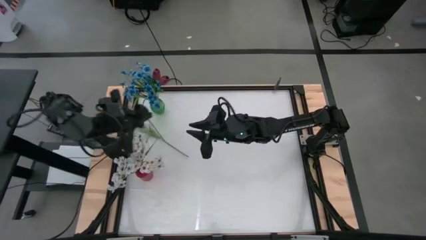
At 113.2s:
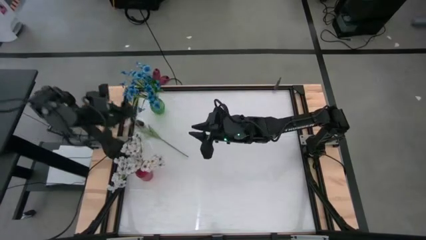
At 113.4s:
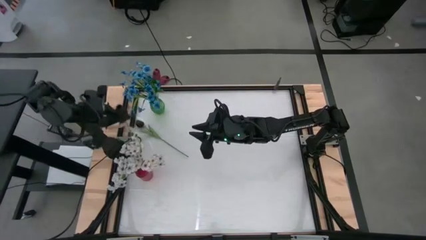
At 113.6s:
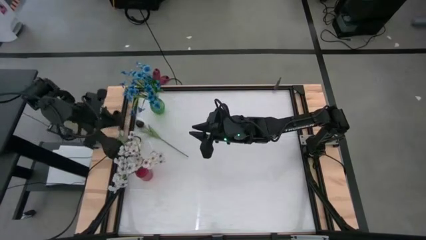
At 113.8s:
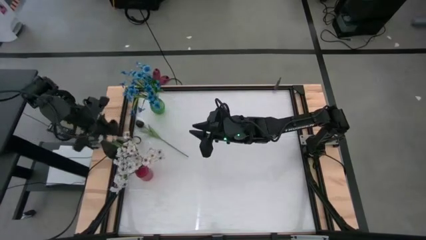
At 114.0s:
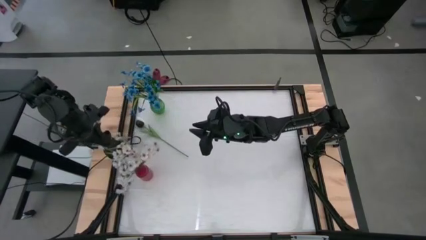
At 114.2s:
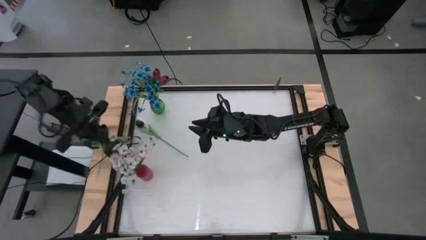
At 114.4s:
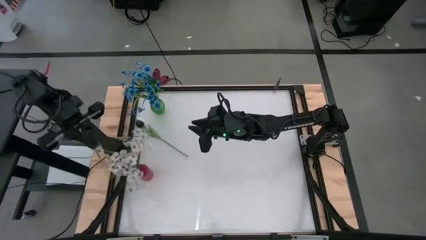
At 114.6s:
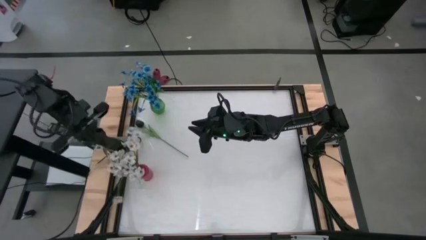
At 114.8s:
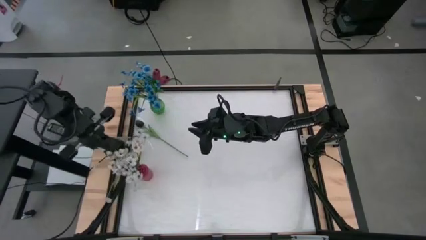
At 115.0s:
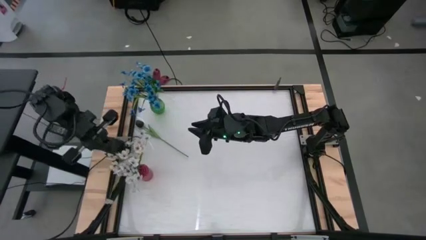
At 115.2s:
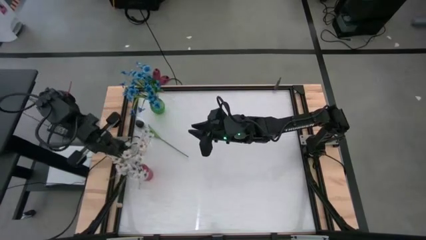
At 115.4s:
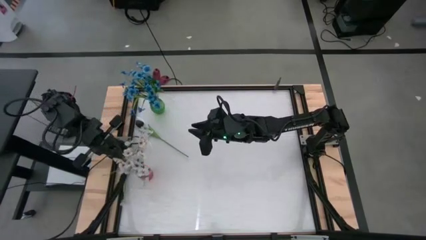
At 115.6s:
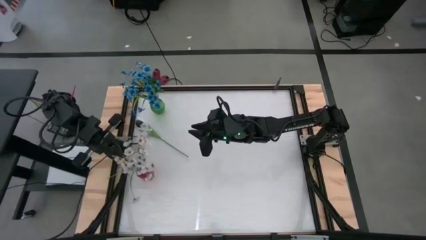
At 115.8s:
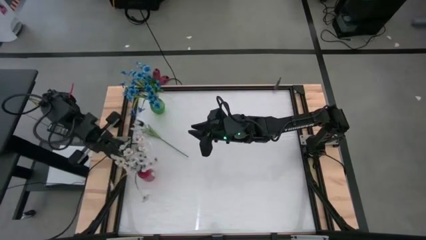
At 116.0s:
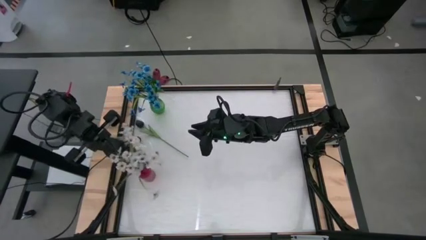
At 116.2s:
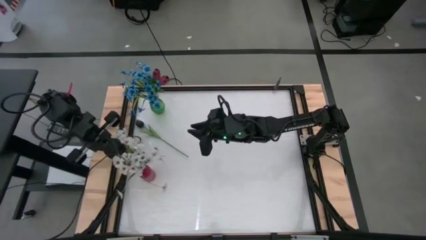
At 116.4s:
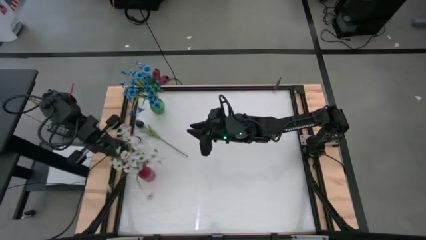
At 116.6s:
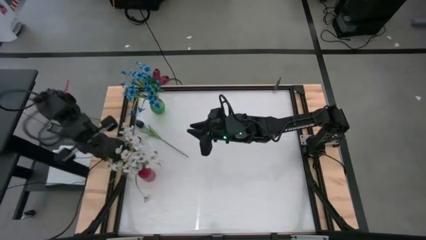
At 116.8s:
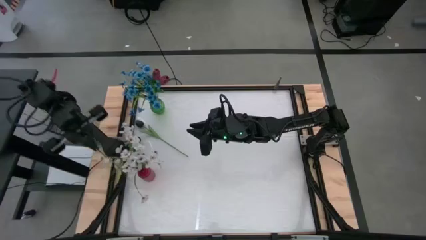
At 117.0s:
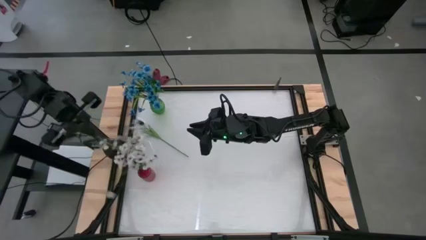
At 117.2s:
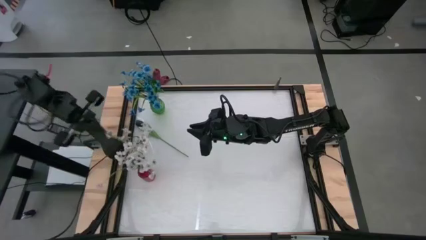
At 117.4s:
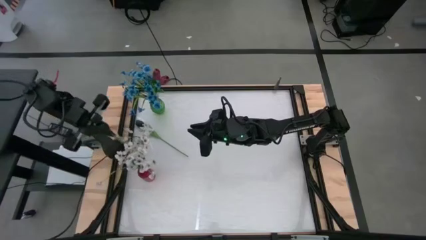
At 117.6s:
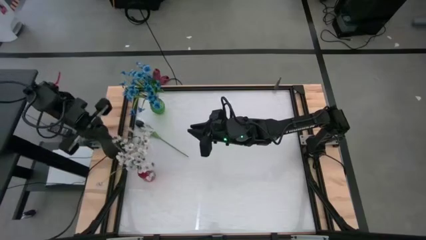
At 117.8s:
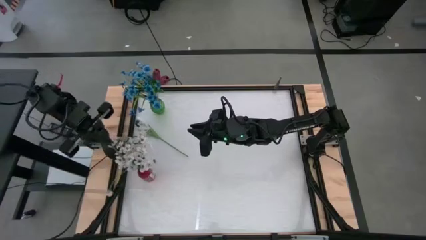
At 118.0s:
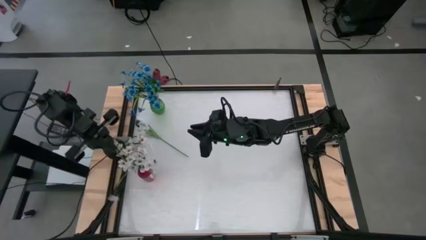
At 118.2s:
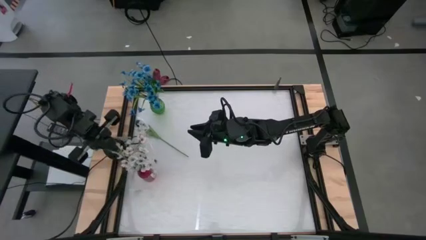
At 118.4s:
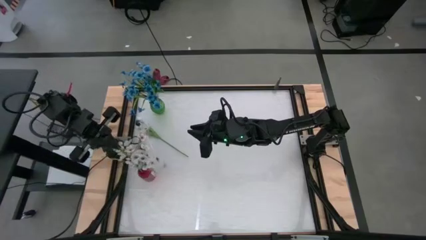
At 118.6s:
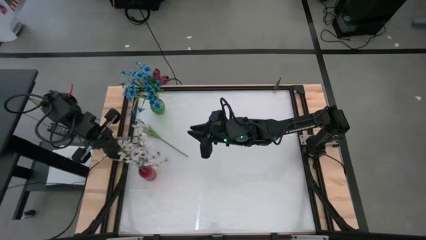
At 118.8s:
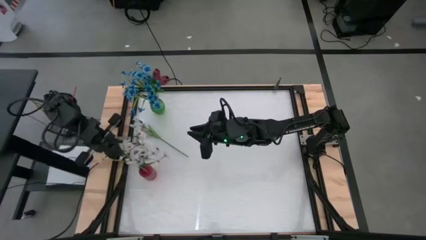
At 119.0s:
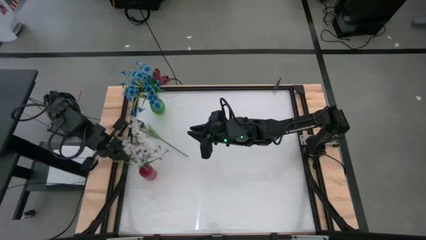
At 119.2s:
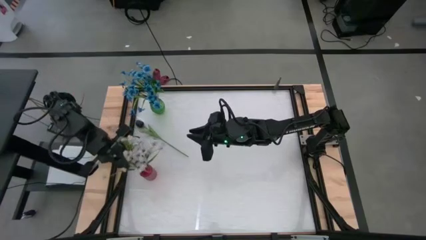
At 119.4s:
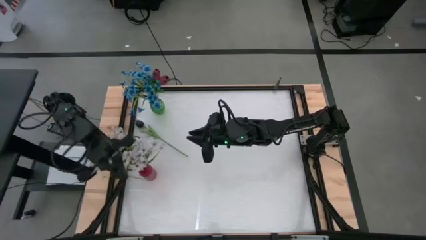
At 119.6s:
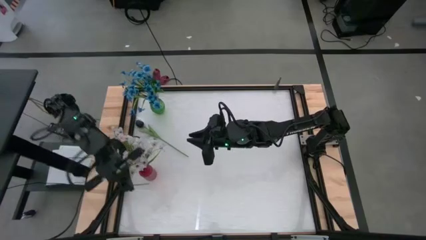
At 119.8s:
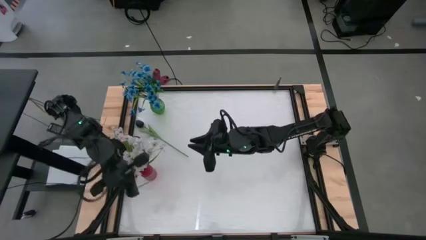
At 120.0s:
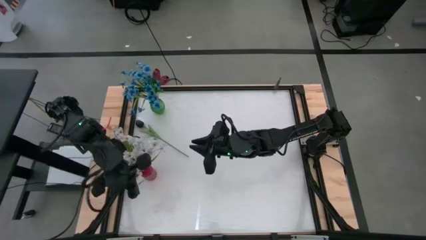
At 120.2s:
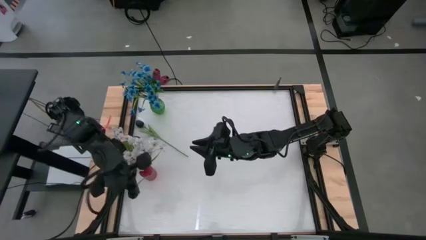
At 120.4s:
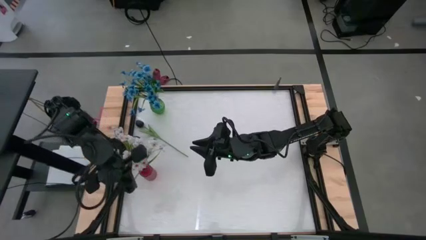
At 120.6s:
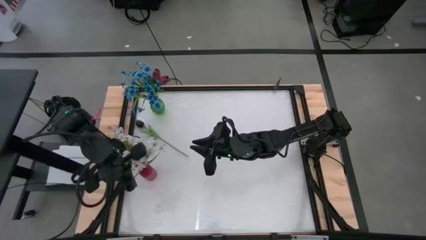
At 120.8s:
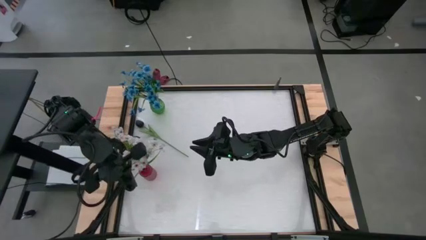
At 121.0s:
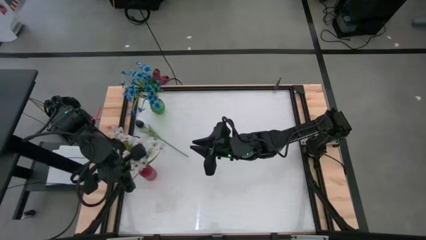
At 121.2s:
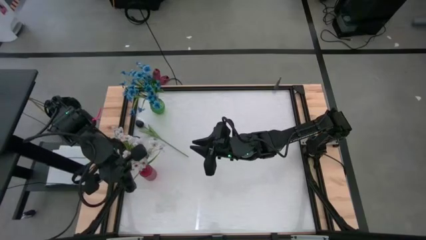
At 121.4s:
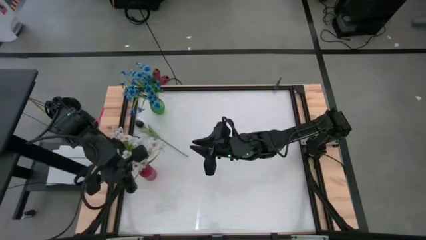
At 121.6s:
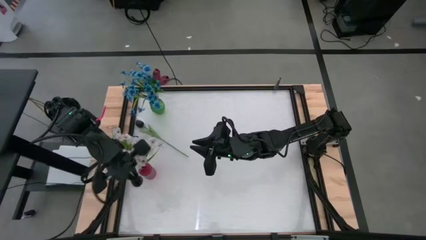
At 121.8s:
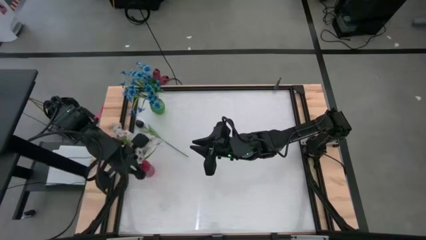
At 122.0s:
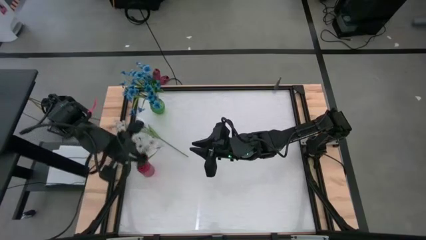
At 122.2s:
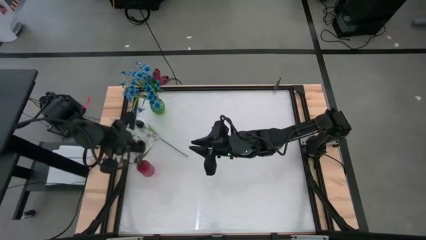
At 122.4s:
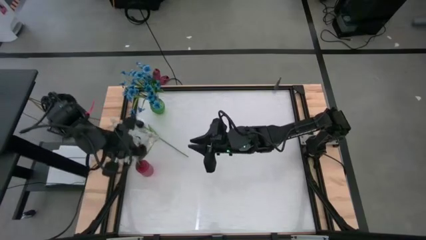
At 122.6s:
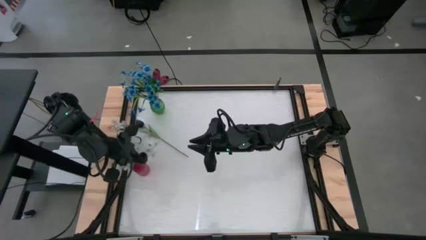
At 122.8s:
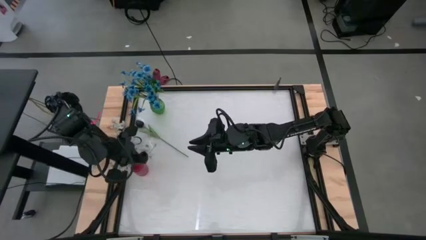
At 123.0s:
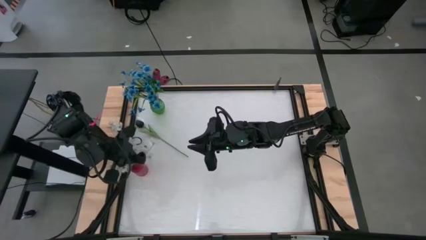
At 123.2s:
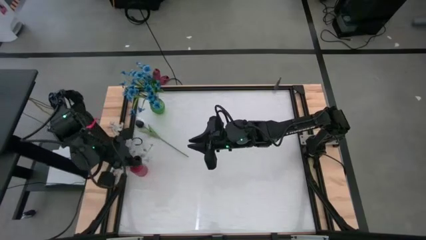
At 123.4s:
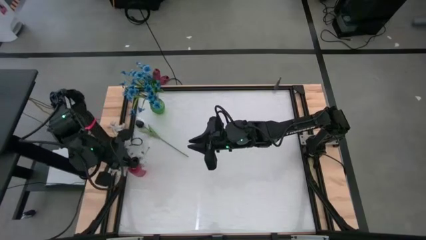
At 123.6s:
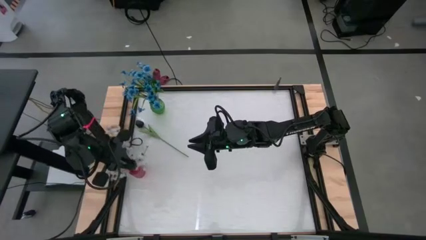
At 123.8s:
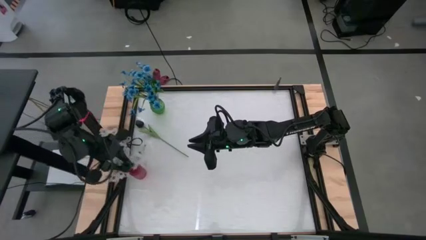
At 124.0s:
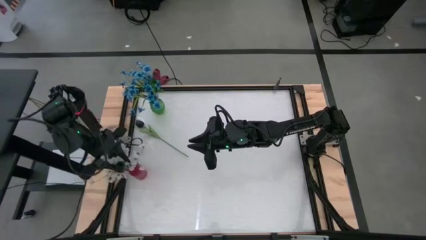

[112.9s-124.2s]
Task: Sort flowers into vase by color
Put the right black tulip into the red vase

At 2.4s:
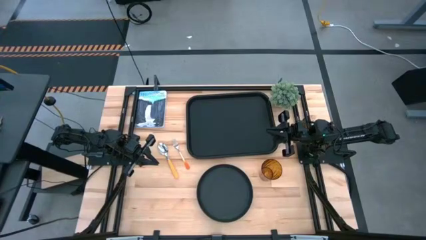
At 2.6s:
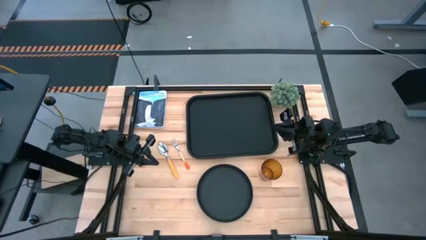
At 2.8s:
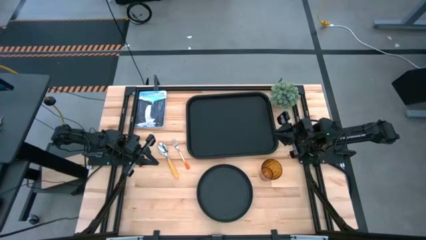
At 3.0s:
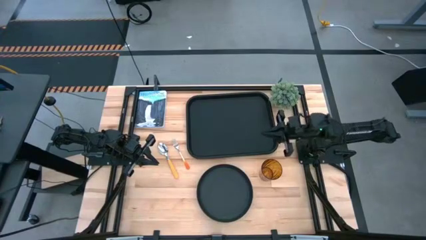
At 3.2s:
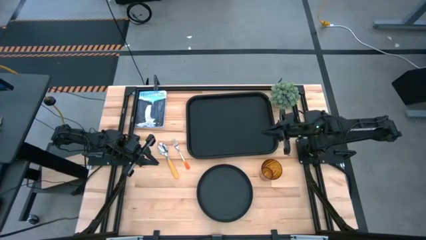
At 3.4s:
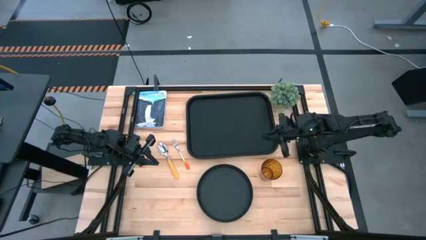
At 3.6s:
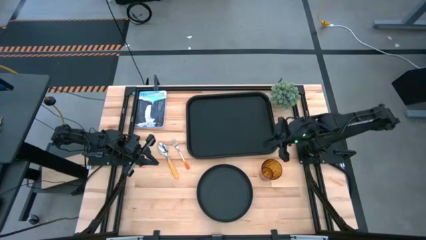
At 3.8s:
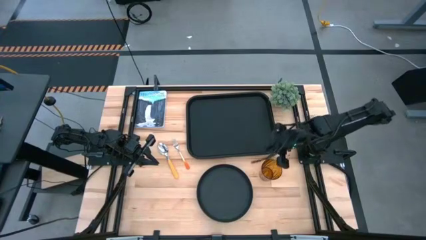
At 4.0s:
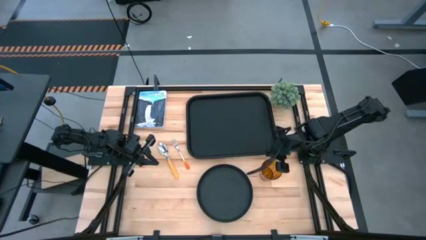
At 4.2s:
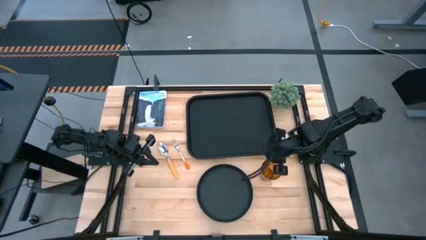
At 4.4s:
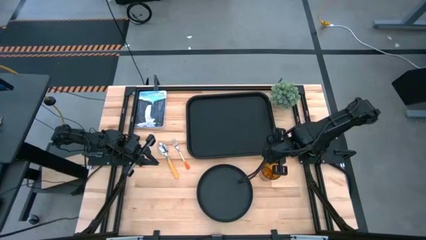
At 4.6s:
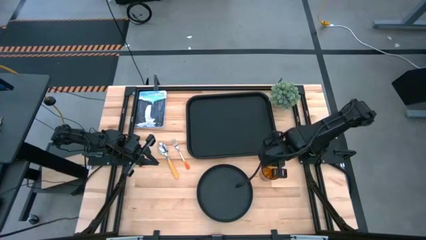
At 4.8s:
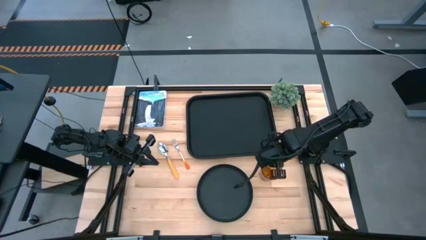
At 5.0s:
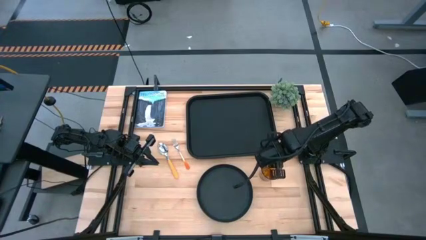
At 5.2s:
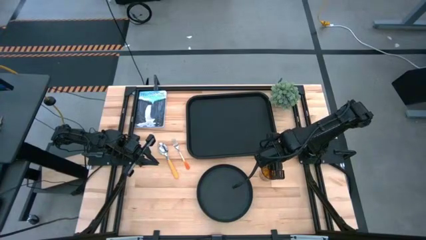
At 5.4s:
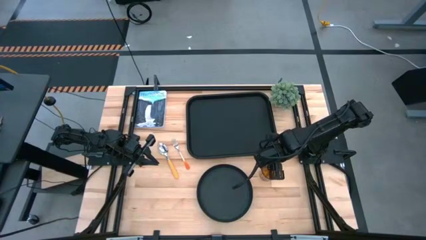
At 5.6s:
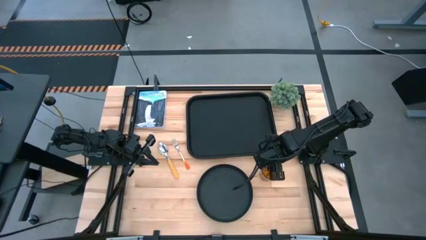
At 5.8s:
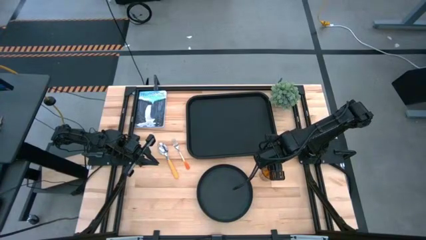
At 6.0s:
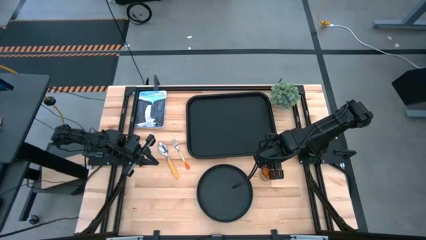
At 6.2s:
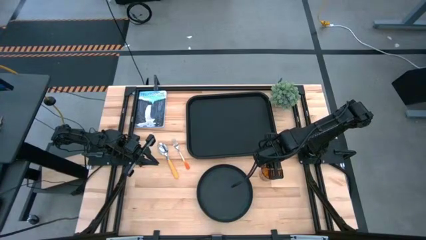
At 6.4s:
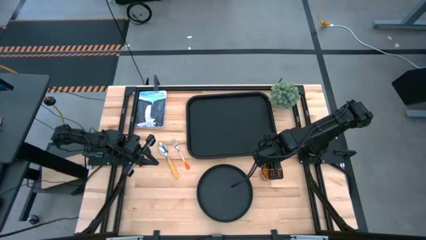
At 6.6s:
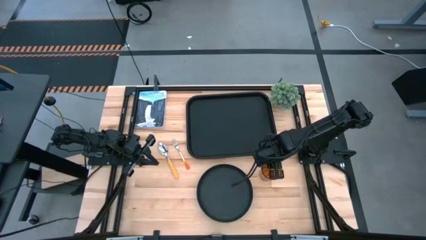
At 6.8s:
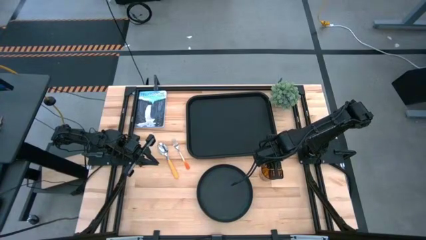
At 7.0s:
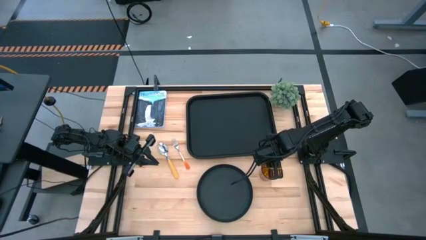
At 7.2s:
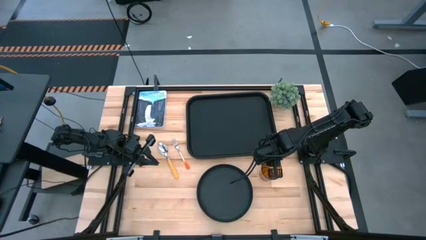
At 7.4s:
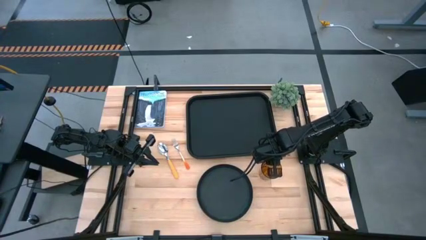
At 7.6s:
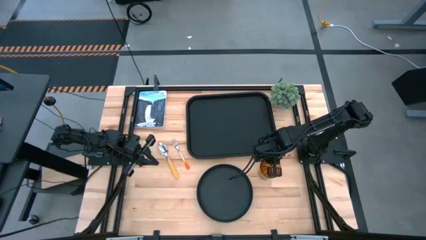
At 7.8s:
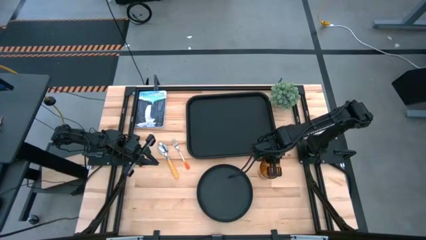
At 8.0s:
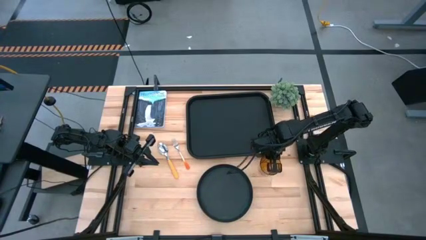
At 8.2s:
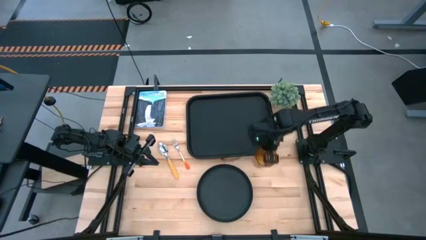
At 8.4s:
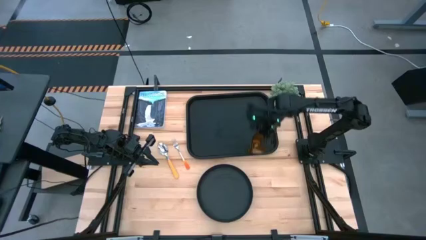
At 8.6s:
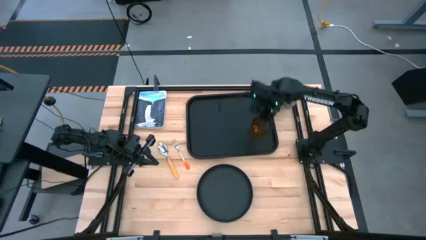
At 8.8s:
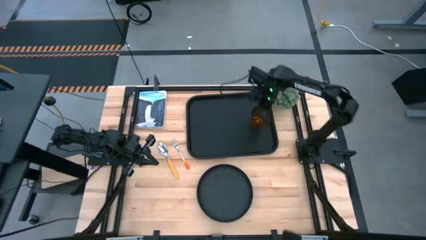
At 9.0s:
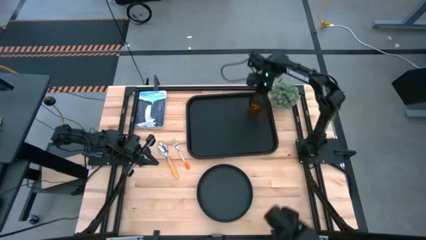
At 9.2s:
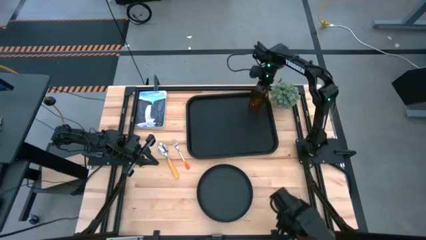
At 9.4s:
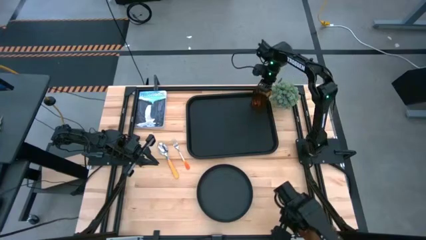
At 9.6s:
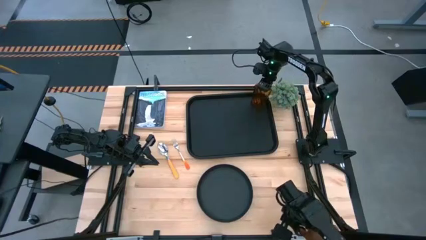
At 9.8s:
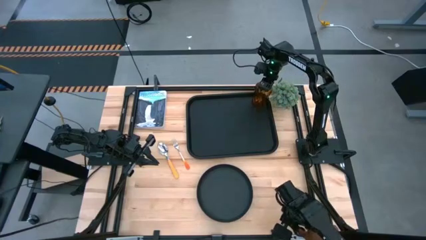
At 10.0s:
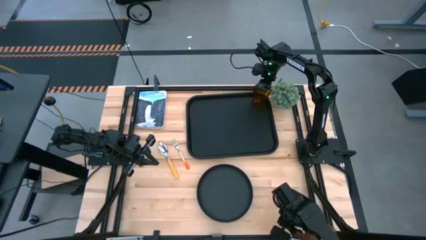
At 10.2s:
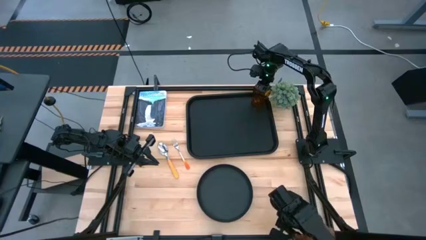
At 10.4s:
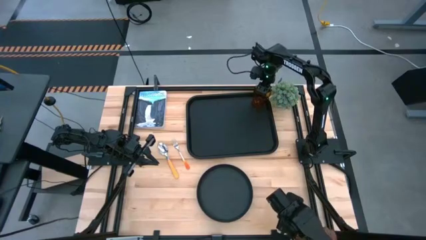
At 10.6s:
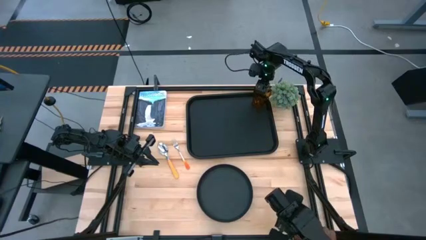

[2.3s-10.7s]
Task: Pick and place plate/cup/fork/spoon on tray
Put the brown cup on the top right of the black serving tray
